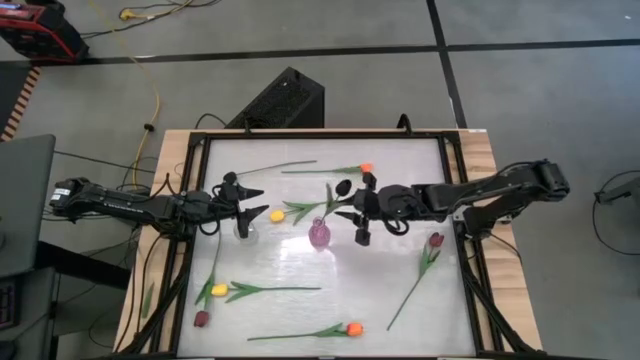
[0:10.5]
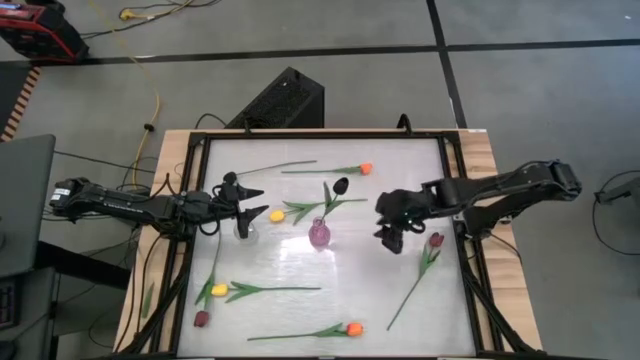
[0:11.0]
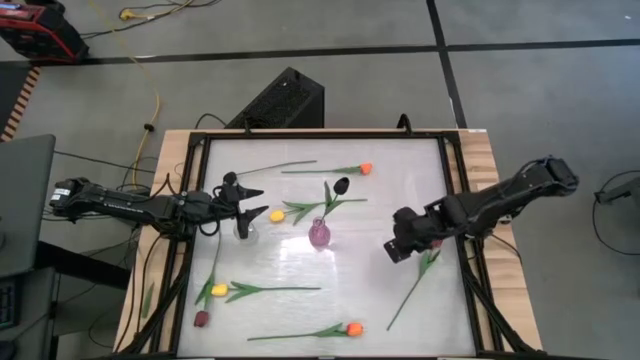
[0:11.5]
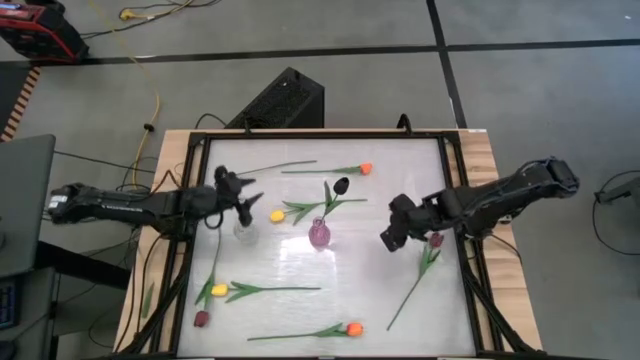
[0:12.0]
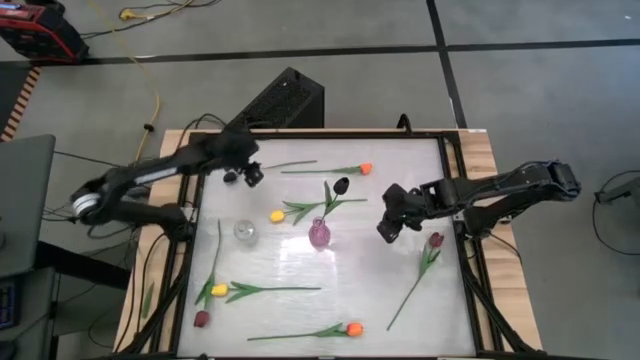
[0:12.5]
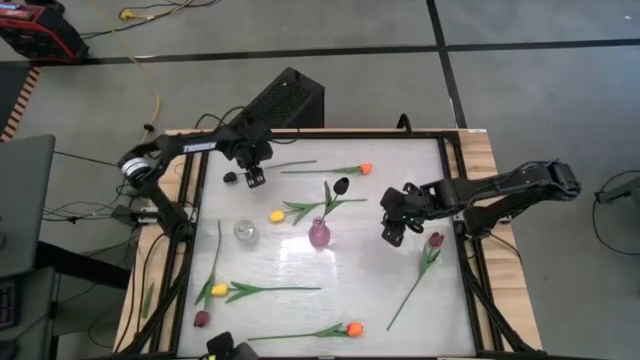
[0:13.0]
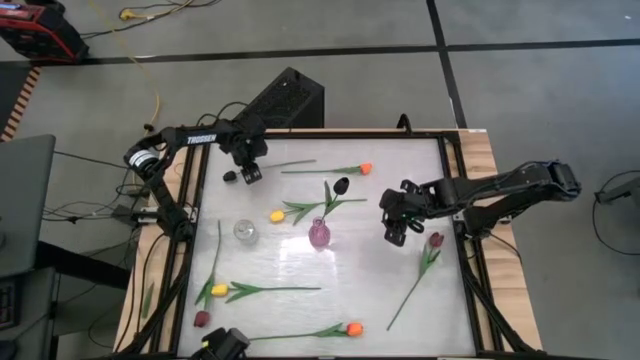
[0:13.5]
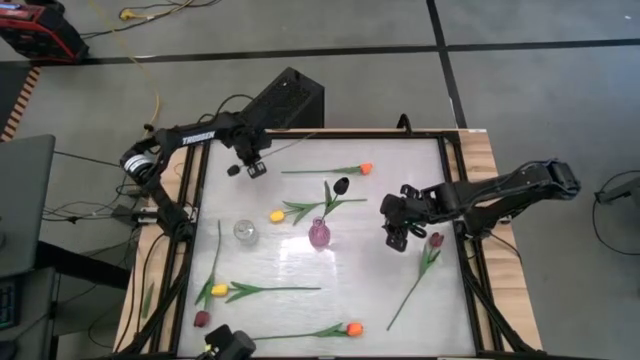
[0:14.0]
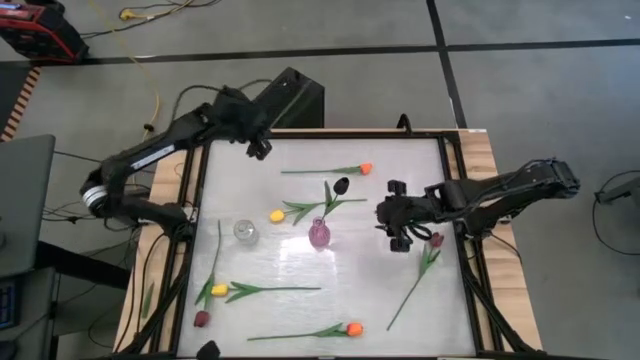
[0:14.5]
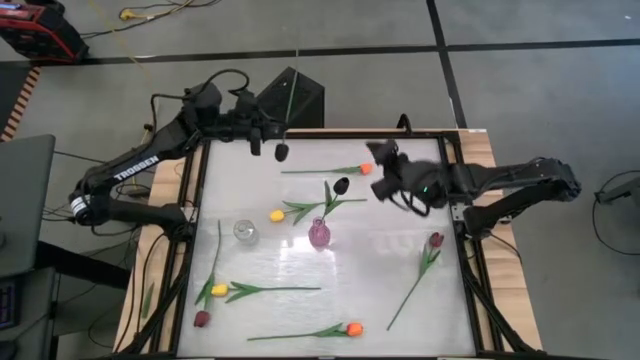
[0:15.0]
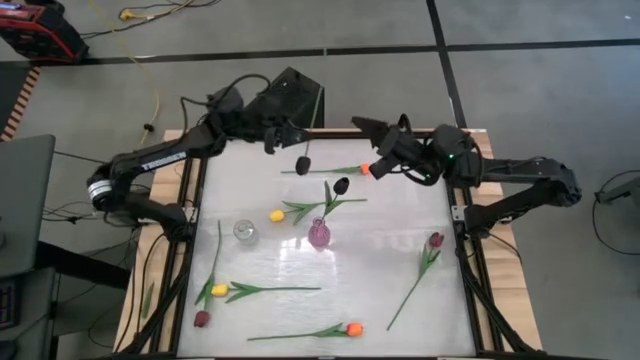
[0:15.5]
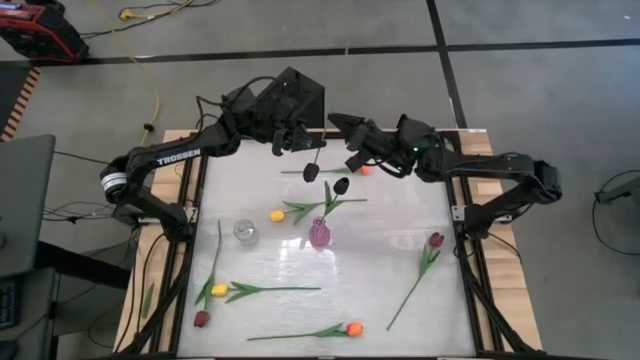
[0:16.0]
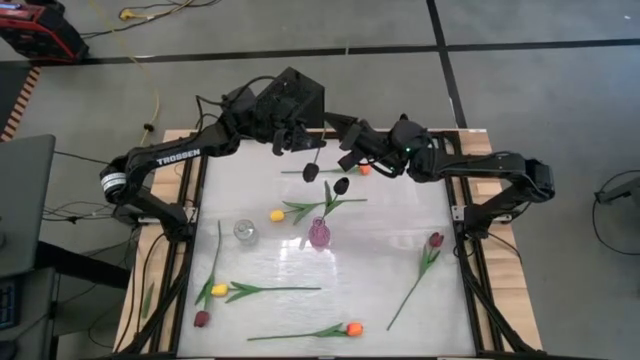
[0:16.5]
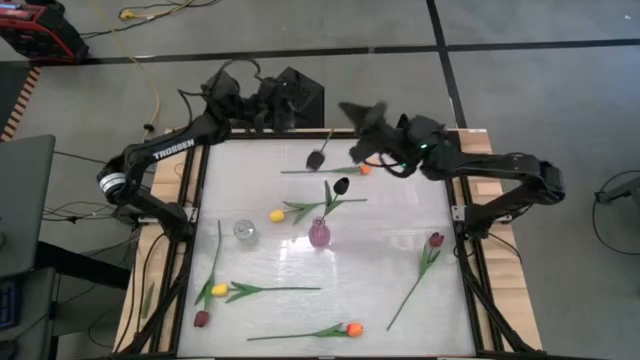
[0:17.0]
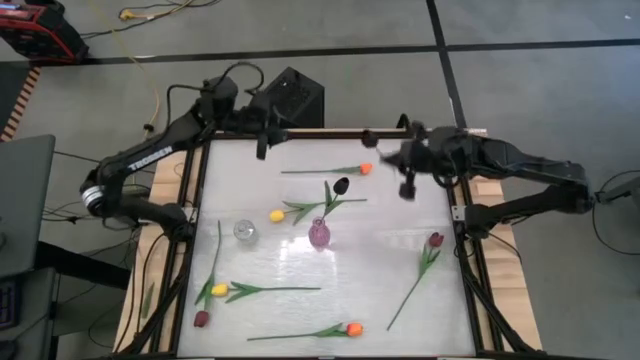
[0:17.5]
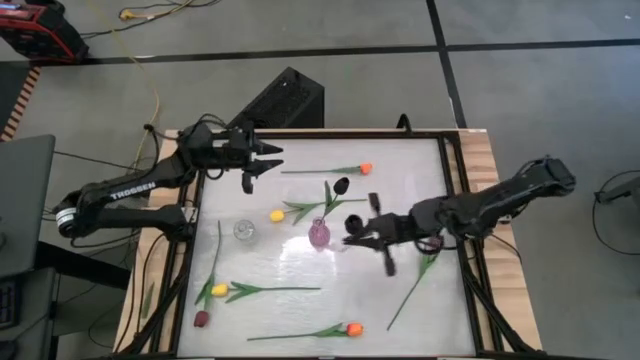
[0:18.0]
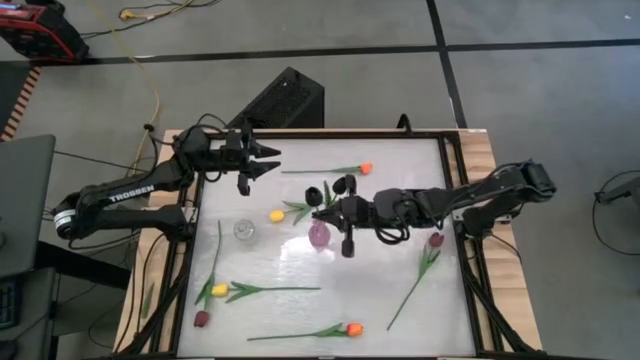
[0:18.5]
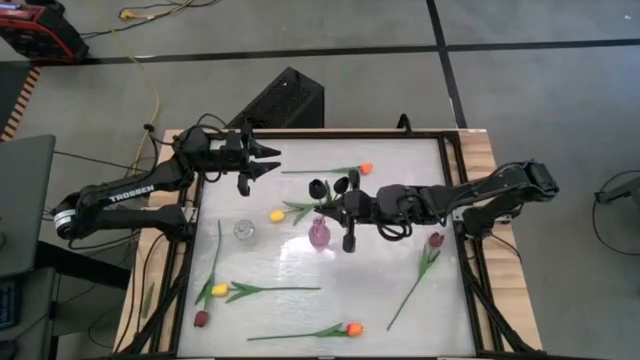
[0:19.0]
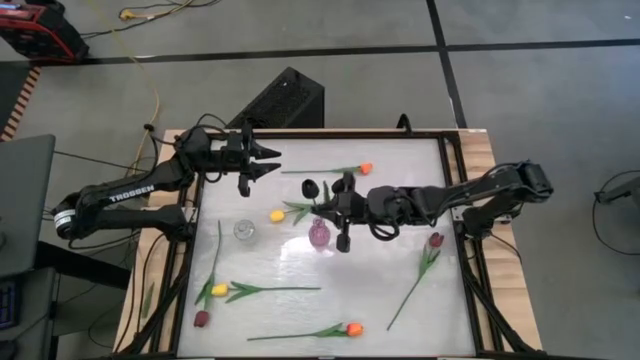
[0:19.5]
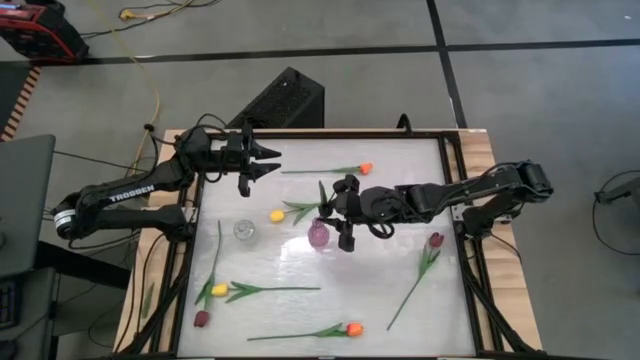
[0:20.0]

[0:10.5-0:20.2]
Task: Sort flowers into vase by color
Put the black flower into the violet vase

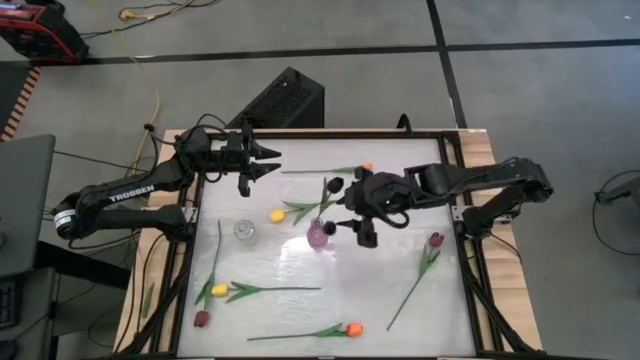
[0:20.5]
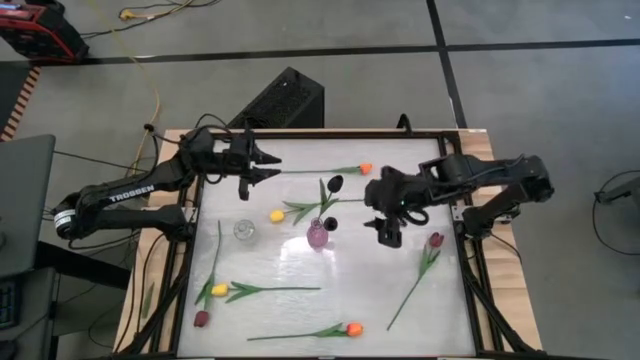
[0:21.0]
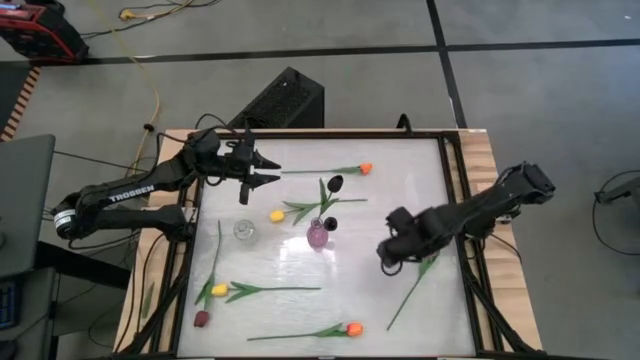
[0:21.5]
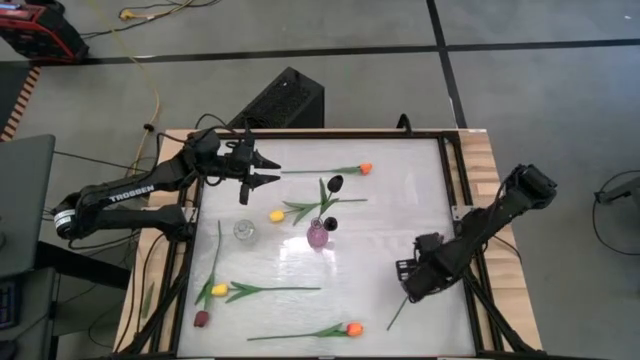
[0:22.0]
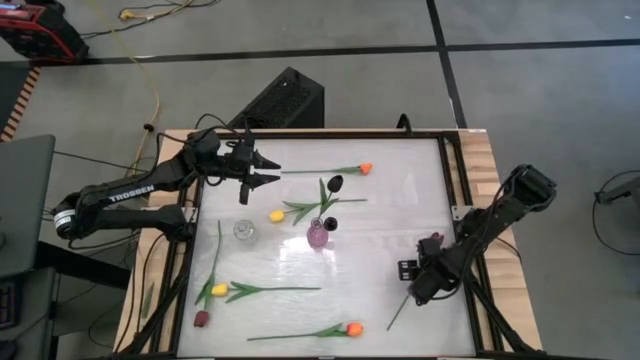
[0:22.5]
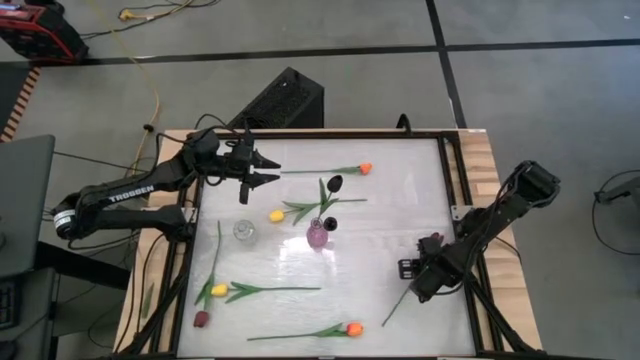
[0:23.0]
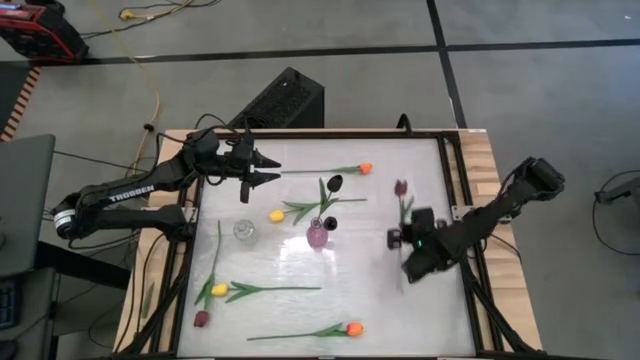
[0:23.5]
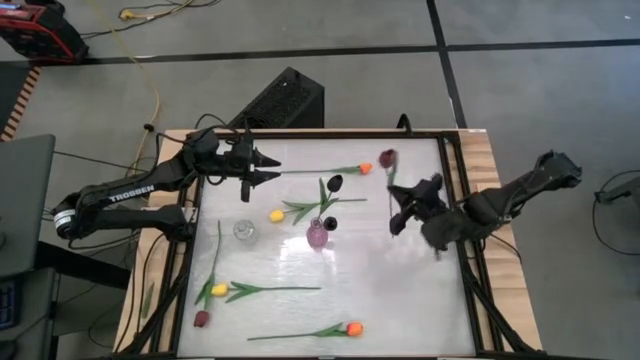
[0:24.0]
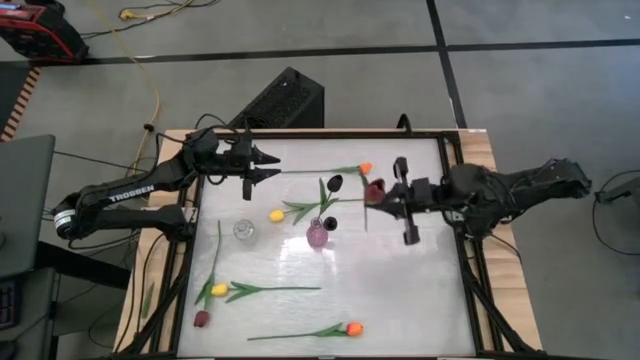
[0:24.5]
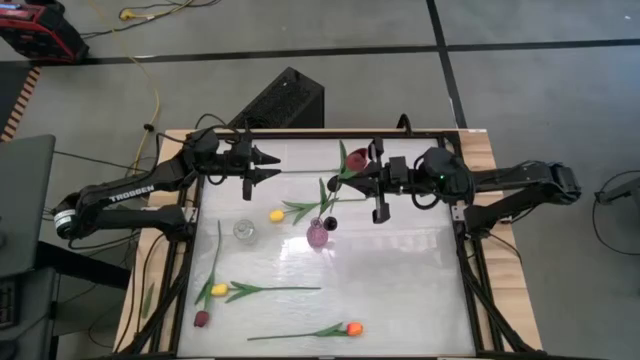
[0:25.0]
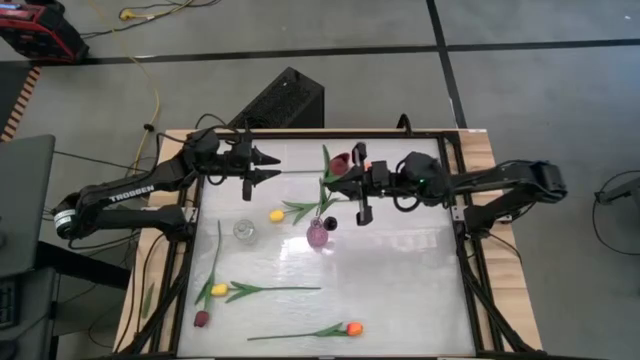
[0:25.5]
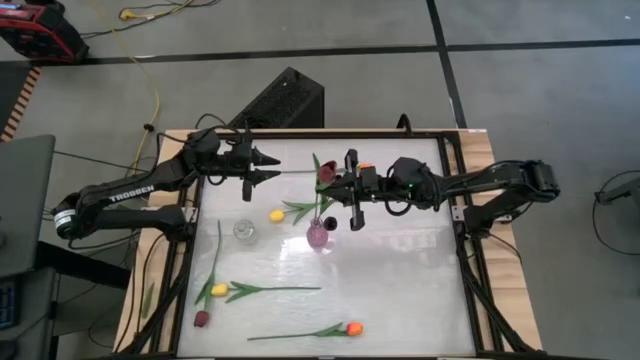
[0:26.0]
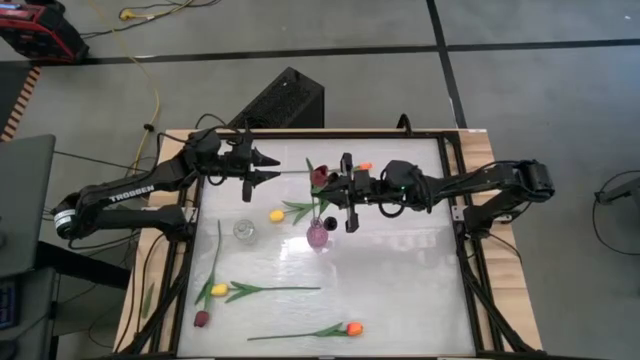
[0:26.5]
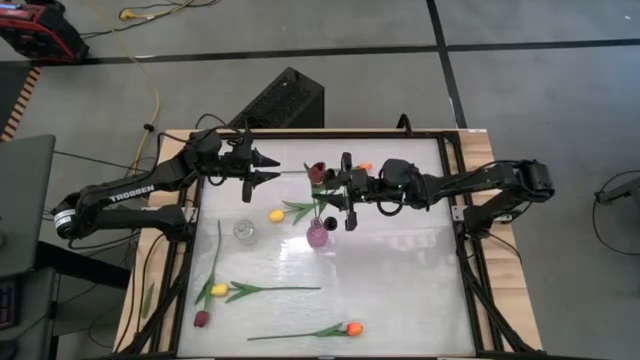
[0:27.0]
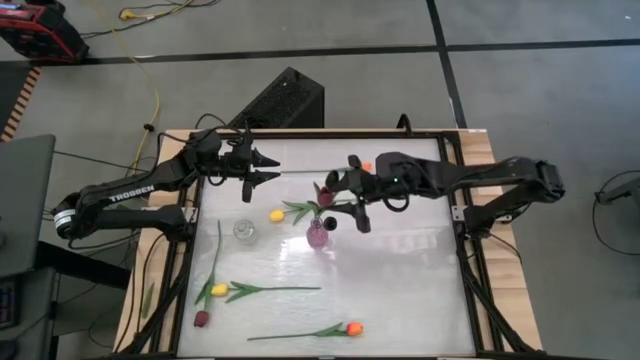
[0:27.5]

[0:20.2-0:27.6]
Put the right red flower into the violet vase

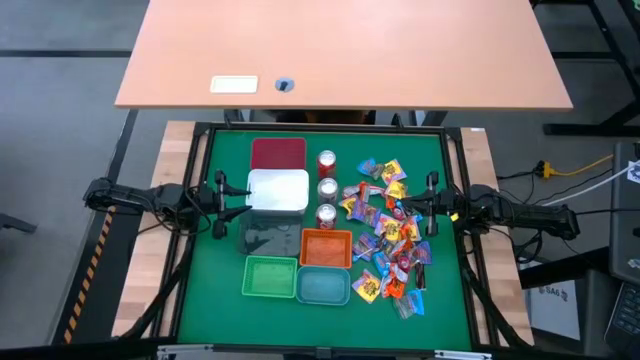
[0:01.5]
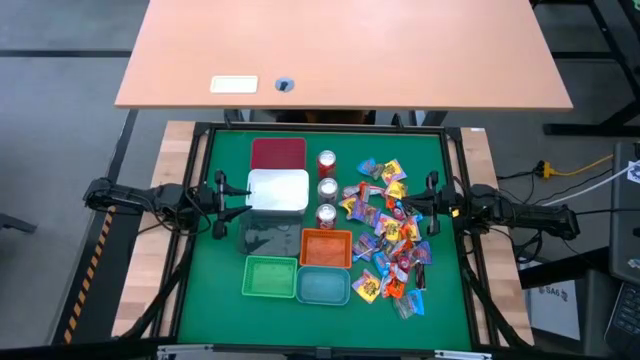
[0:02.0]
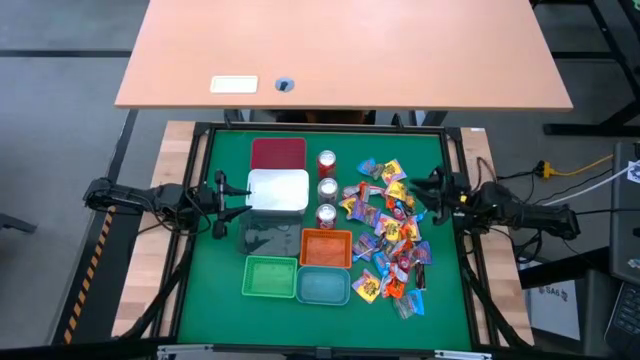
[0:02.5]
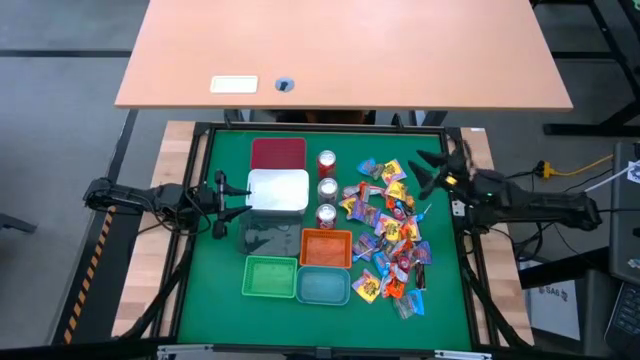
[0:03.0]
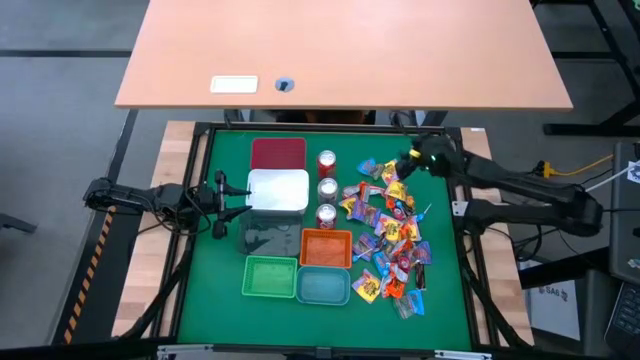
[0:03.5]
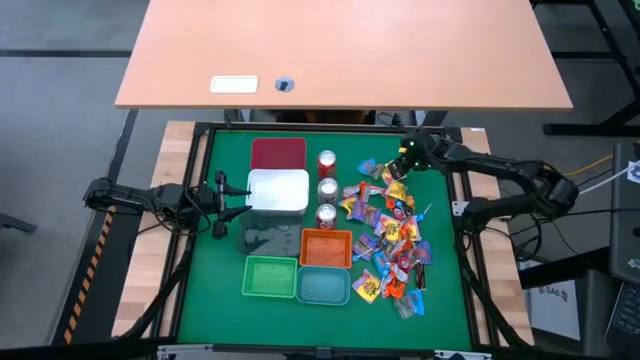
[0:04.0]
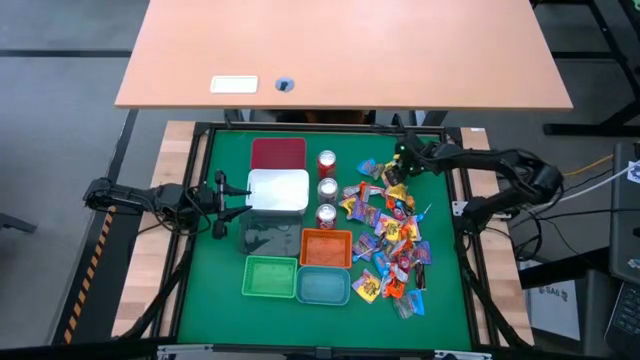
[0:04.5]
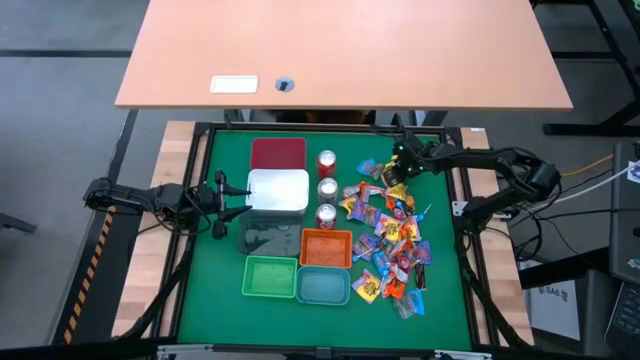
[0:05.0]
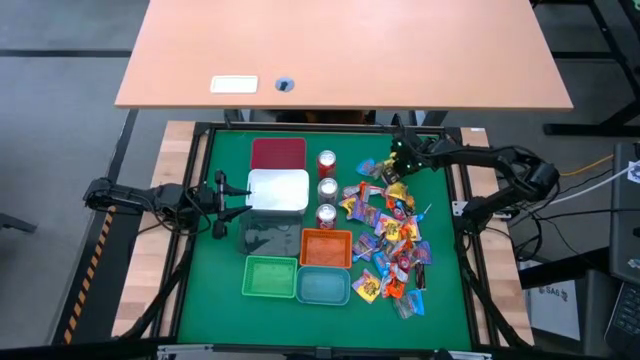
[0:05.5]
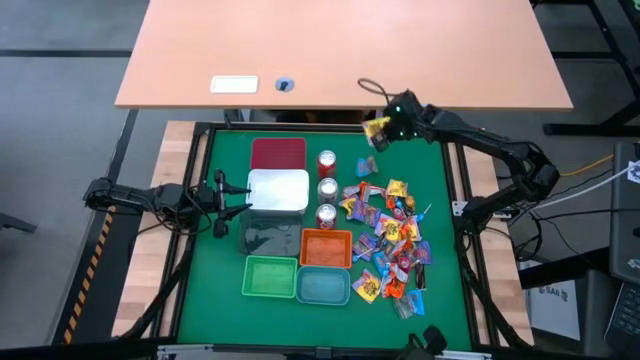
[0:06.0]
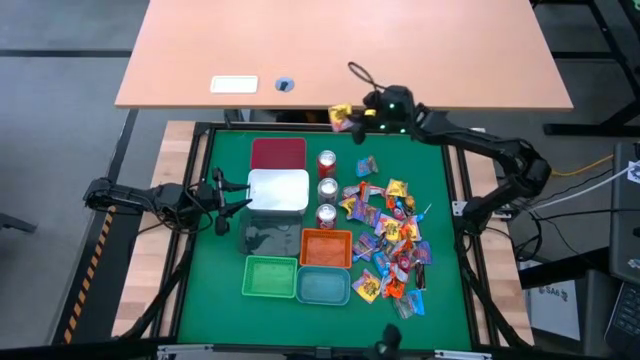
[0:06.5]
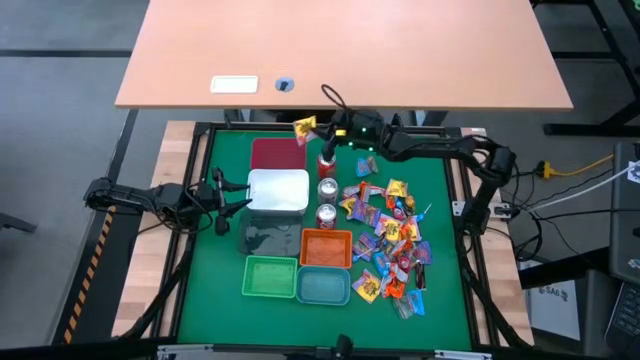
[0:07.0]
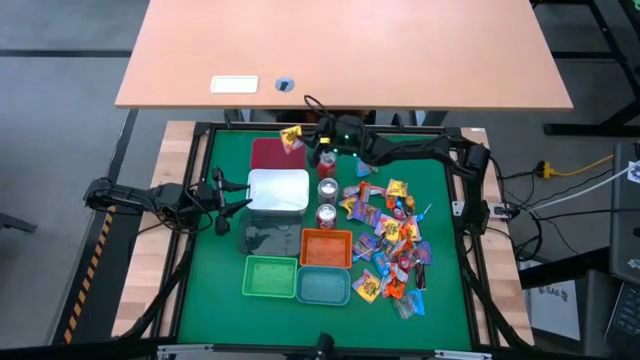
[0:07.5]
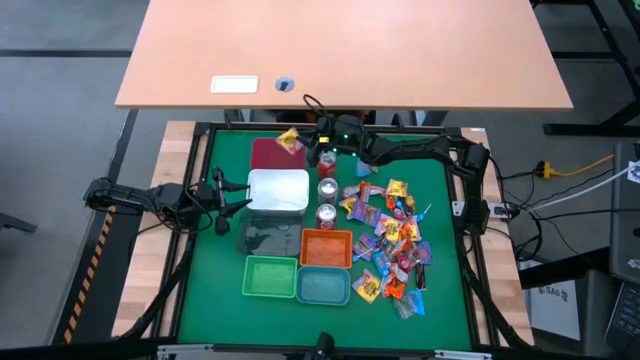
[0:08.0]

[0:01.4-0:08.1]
Task: Sort candy
Put the yellow candy into the red bin
